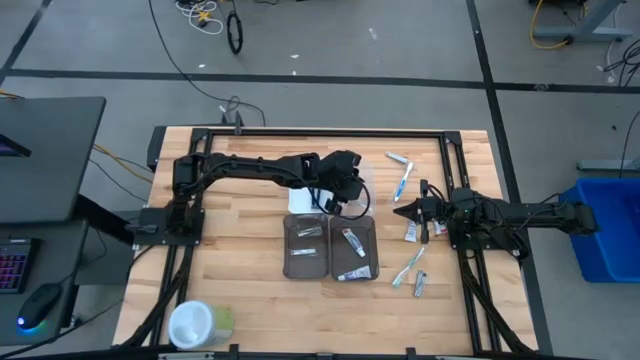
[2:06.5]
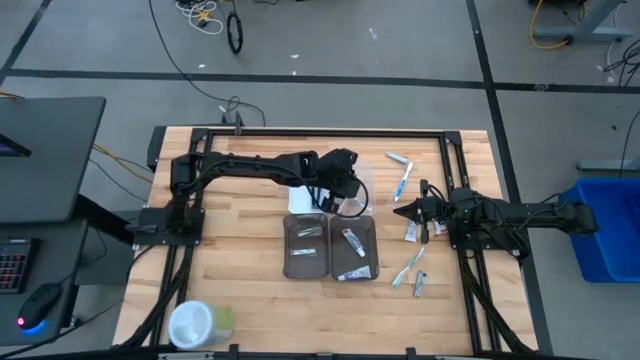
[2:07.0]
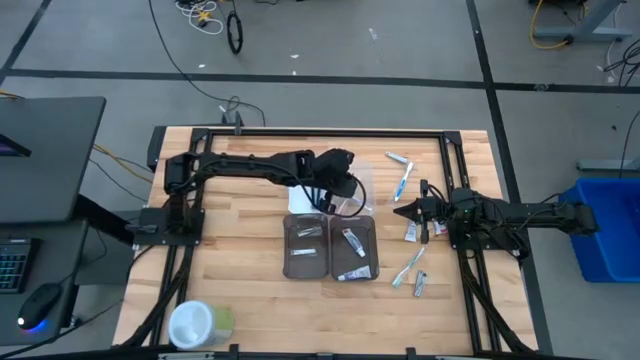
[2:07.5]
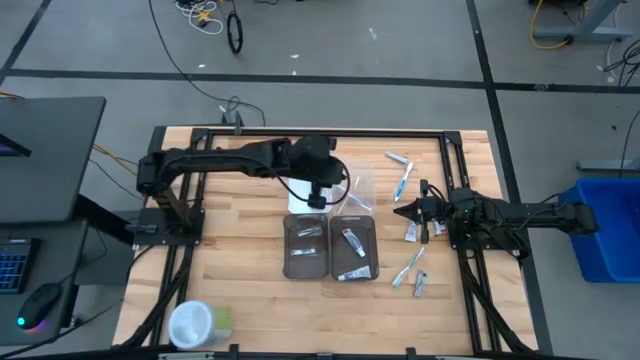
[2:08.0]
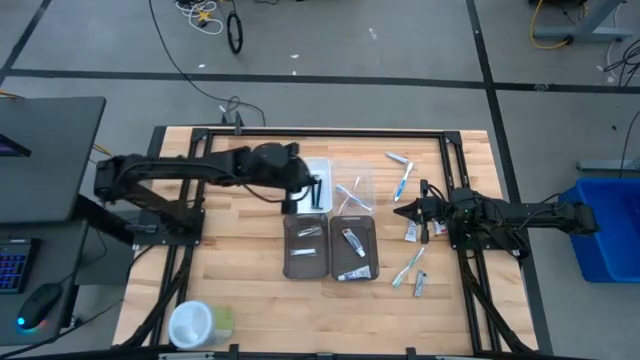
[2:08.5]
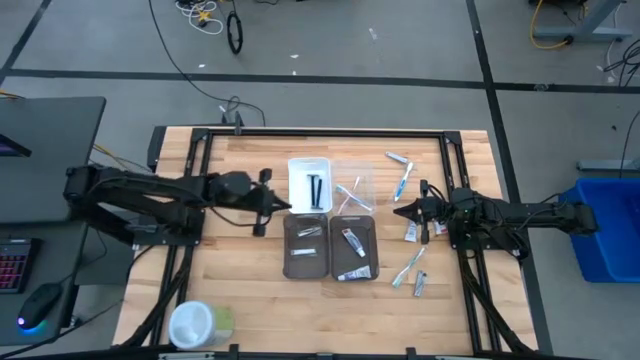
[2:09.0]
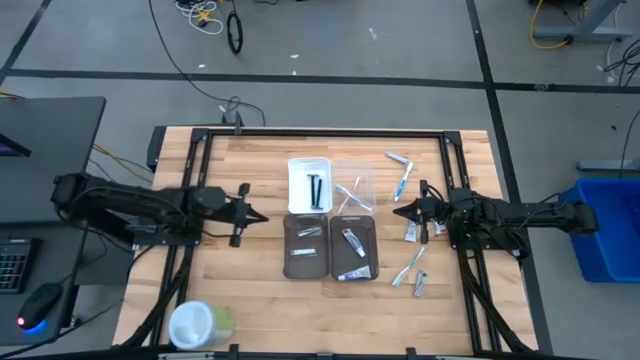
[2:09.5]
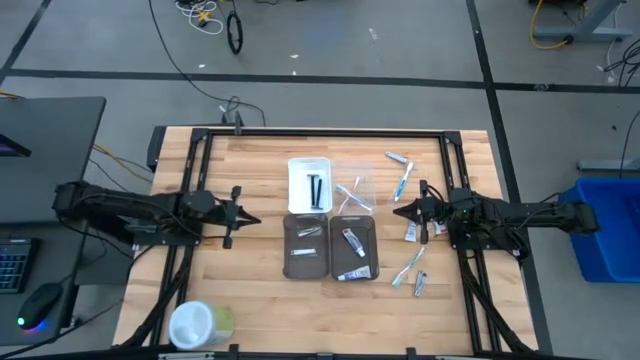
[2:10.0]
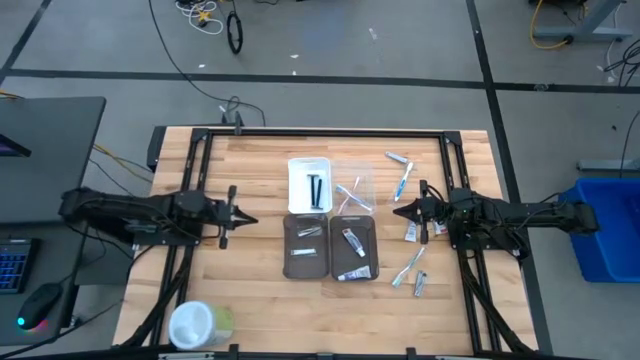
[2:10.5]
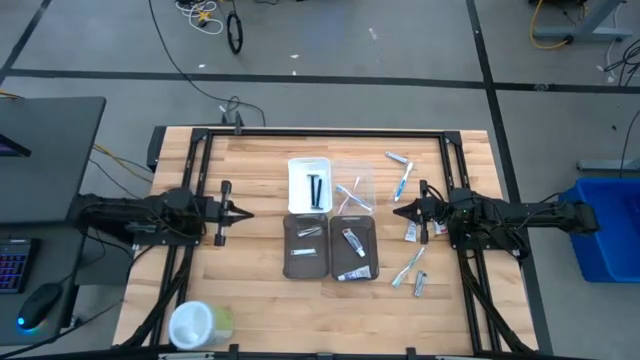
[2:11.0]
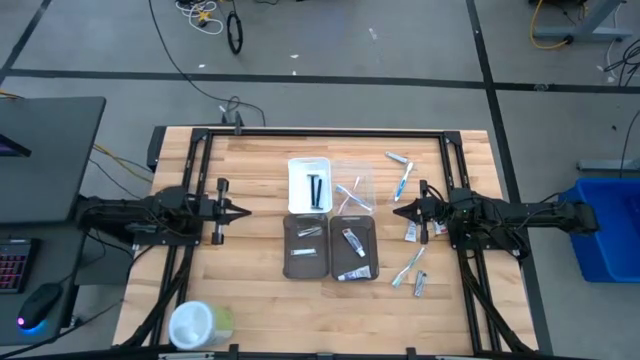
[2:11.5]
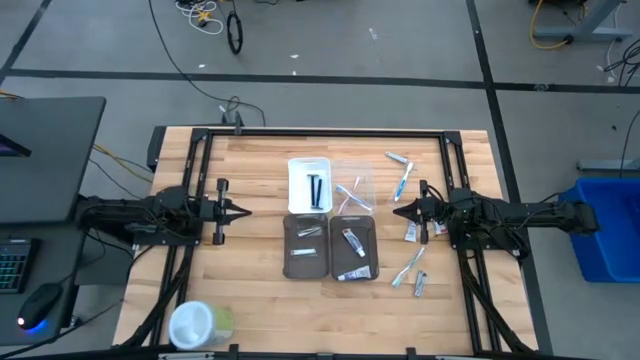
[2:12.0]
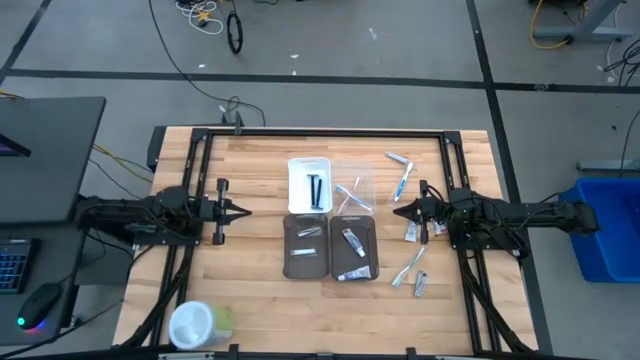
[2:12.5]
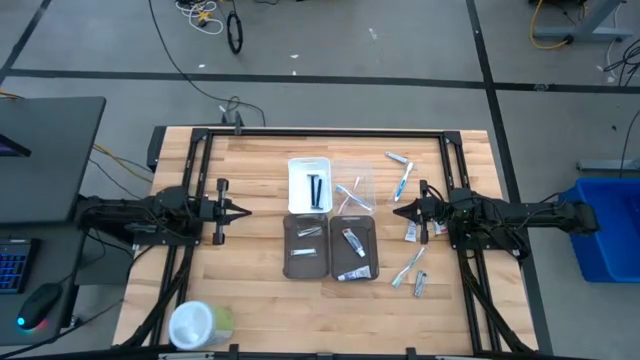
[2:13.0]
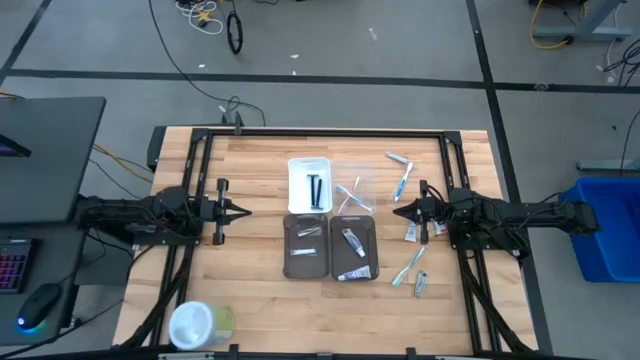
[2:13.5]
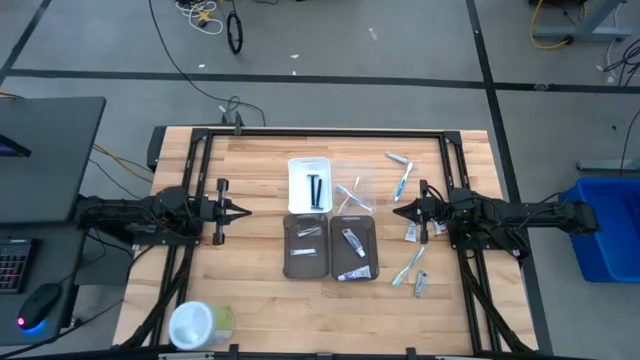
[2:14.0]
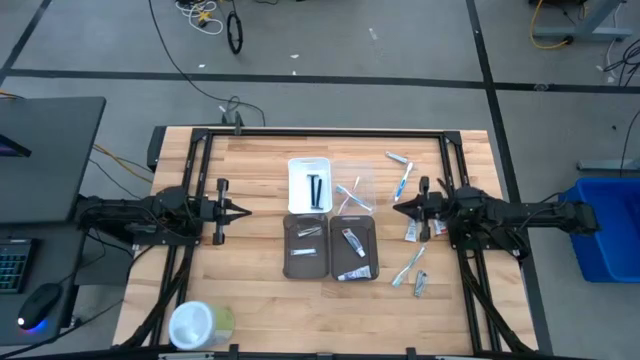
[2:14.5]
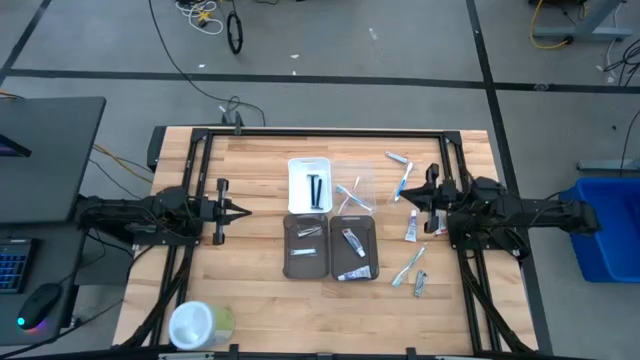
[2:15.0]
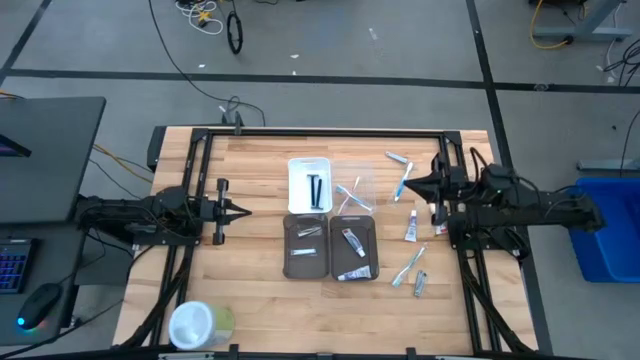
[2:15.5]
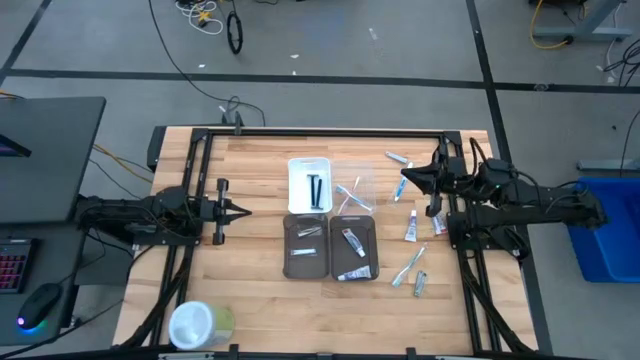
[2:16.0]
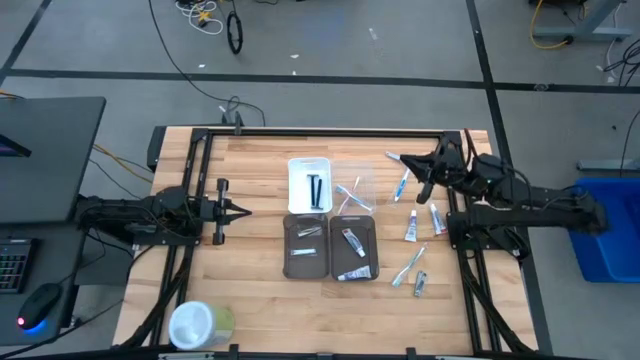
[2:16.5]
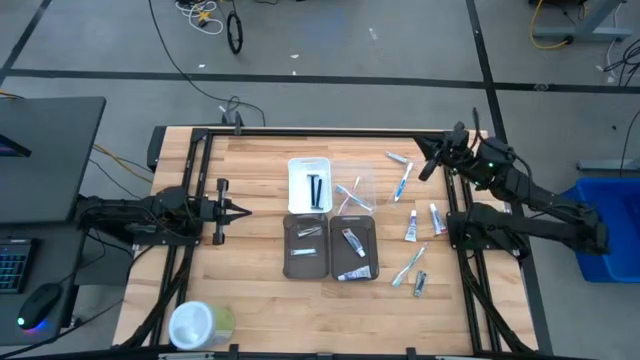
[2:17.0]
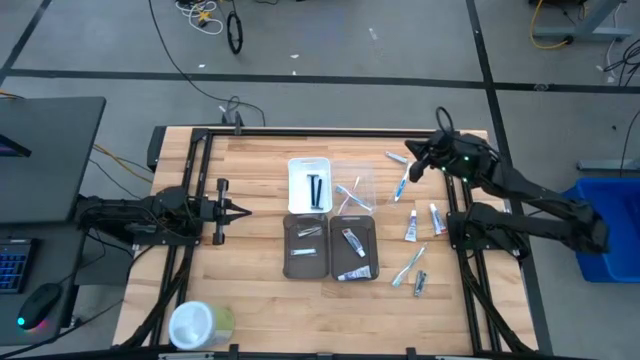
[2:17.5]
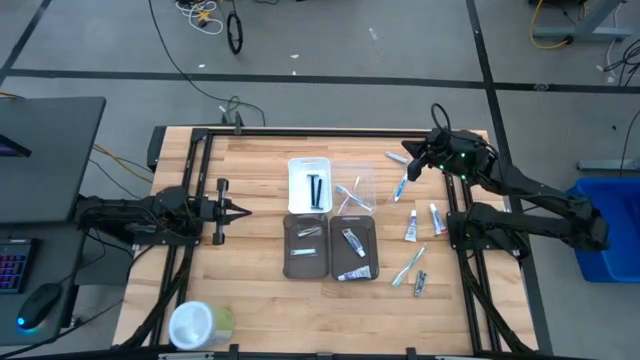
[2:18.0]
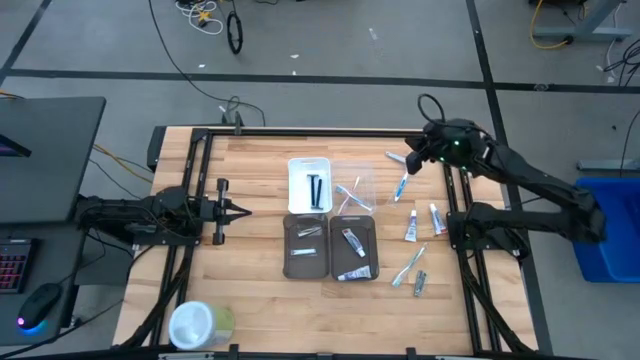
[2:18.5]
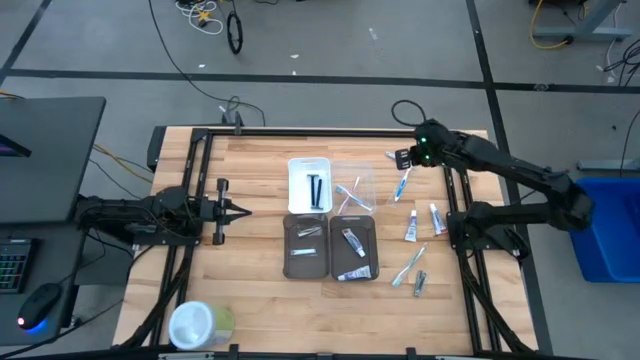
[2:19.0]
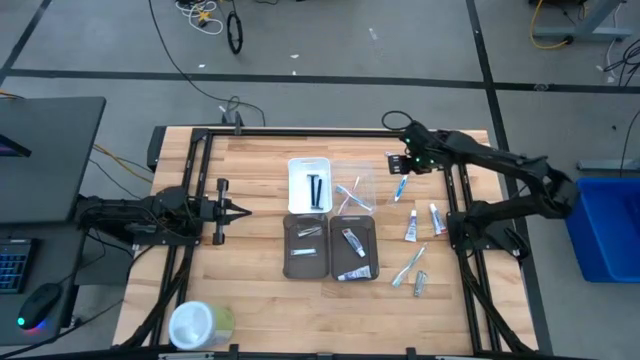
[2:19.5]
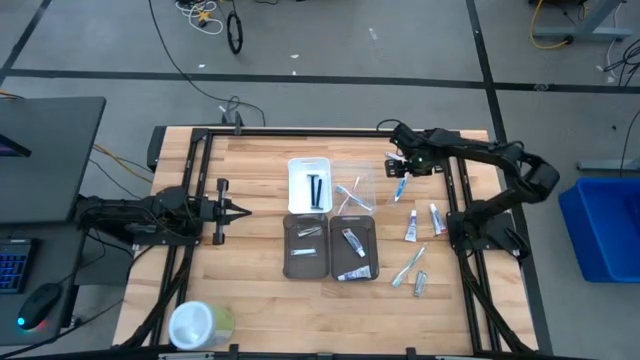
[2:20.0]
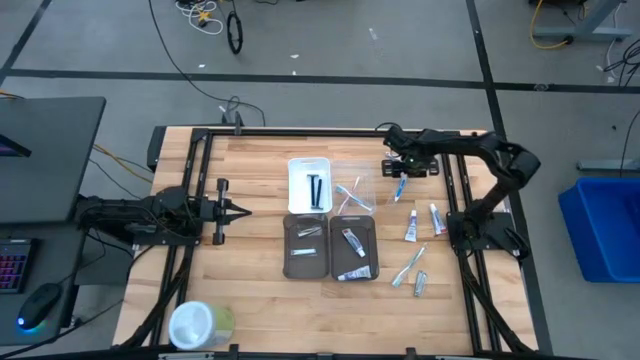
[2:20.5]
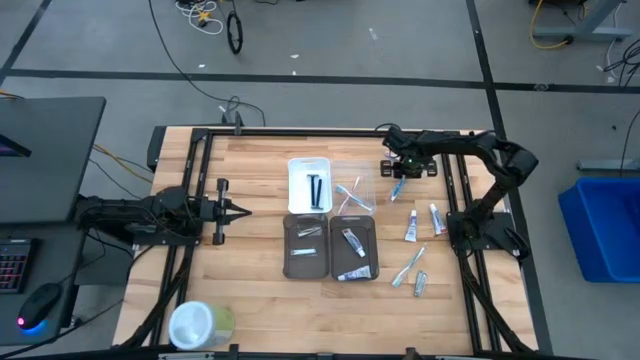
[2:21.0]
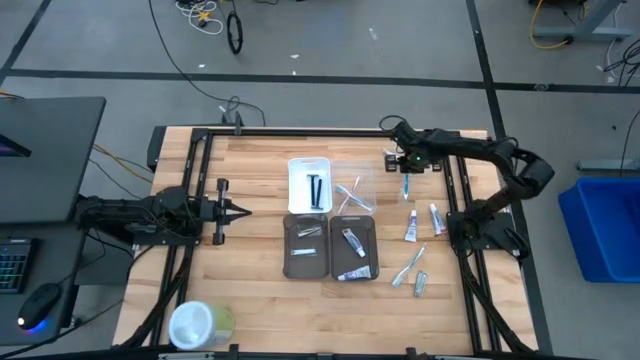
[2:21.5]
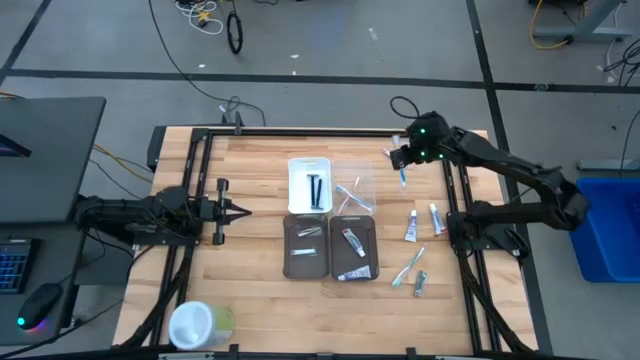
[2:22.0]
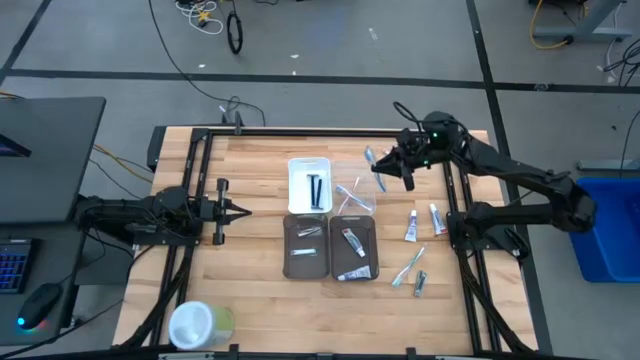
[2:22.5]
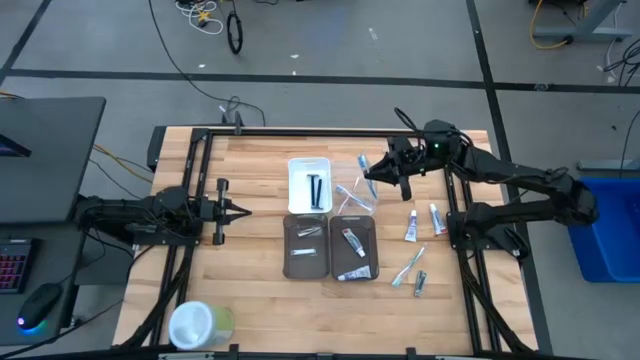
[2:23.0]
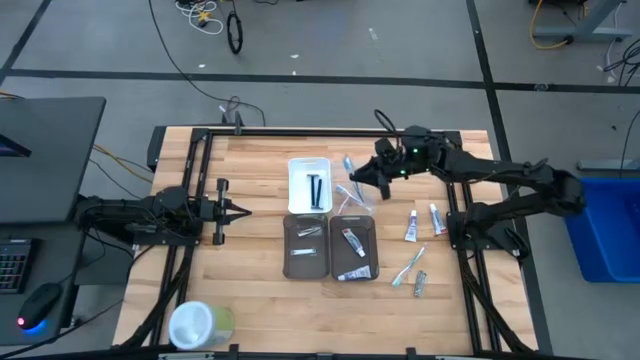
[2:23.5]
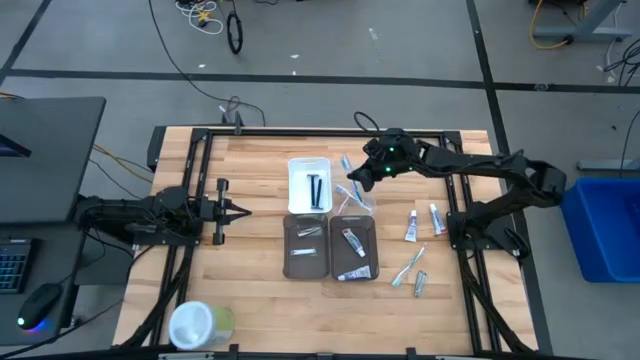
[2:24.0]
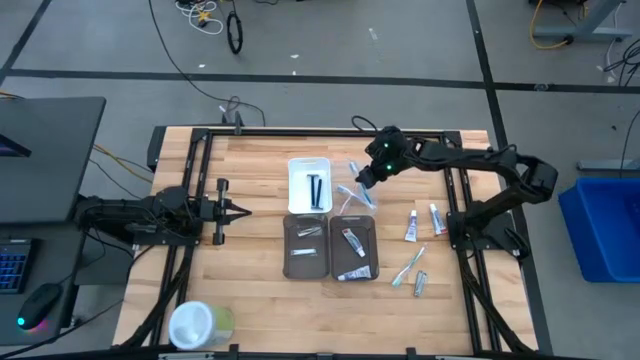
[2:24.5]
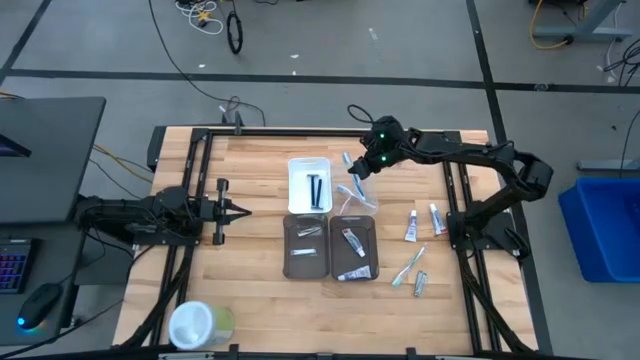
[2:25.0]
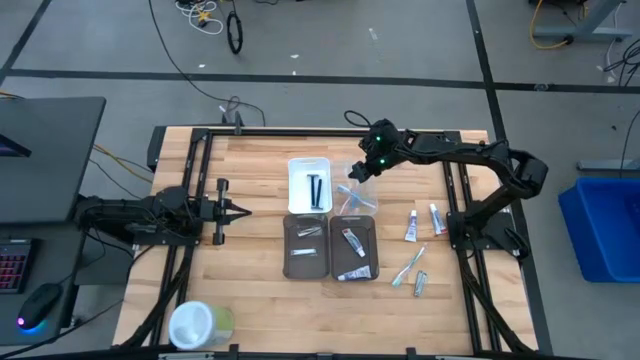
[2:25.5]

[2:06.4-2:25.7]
Task: Pick & Place Travel size toiletries
Put the blue toothbrush into the transparent bin

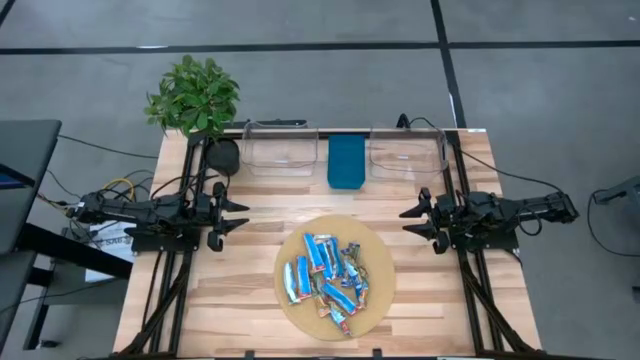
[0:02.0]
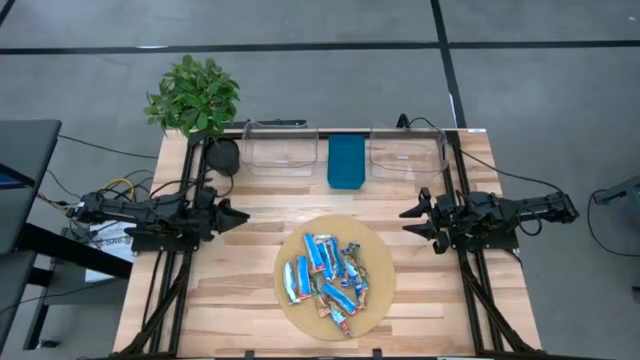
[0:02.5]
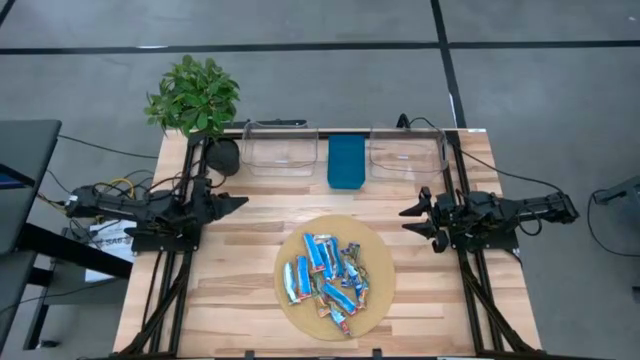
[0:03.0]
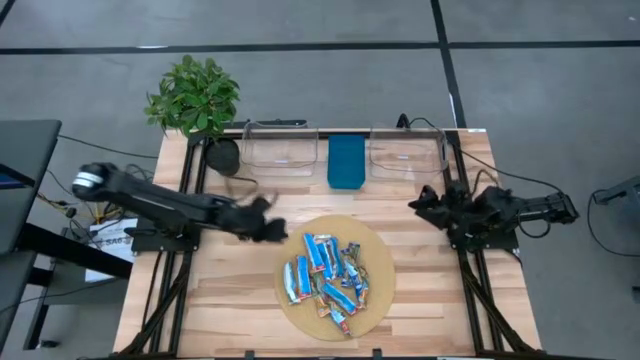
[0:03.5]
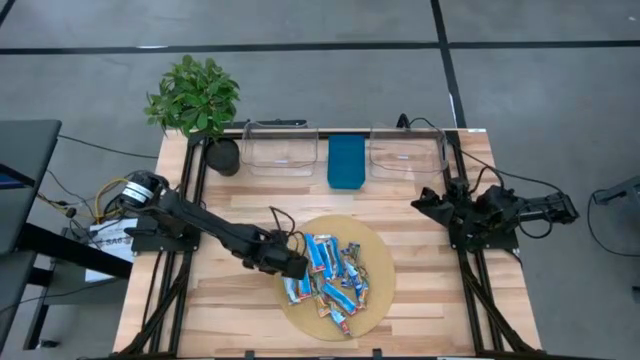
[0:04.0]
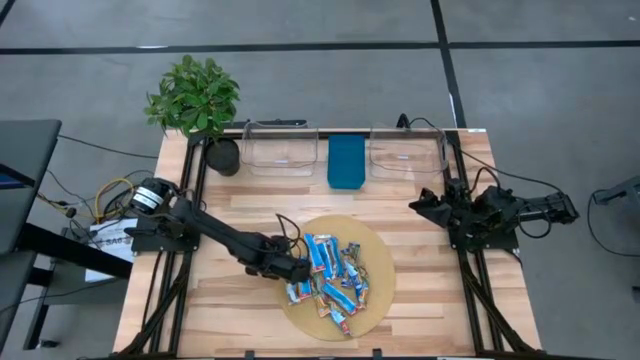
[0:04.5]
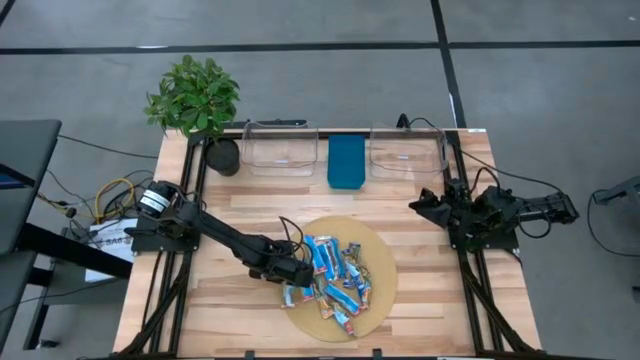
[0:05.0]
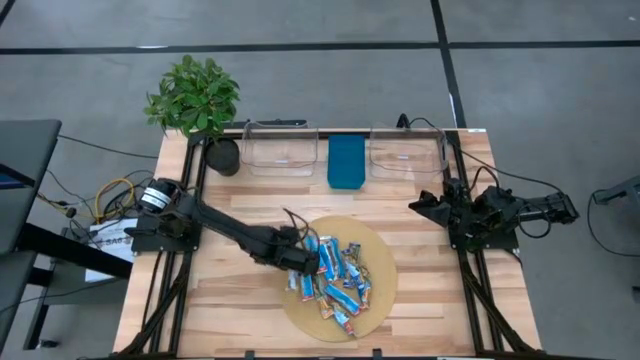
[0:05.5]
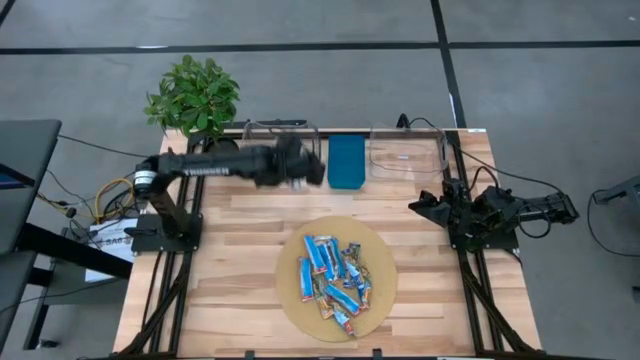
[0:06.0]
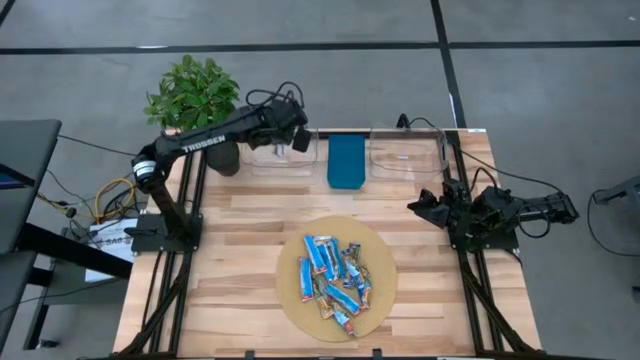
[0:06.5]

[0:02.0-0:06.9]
Task: Pick and place Granola Bars by type
Put the yellow granola bar into the left transparent bin
